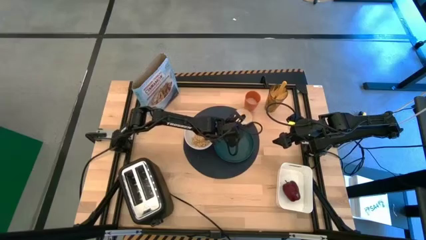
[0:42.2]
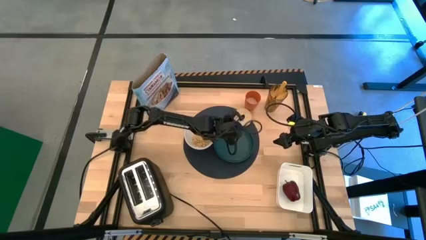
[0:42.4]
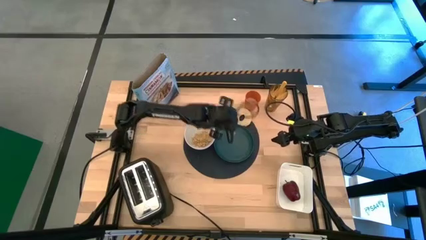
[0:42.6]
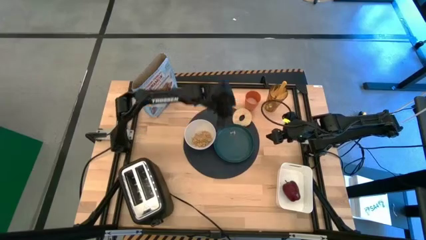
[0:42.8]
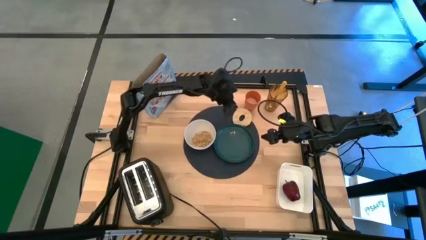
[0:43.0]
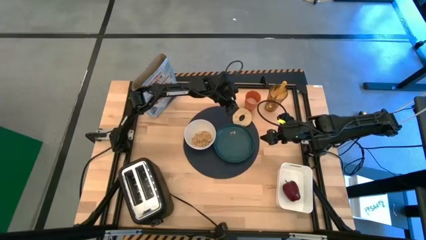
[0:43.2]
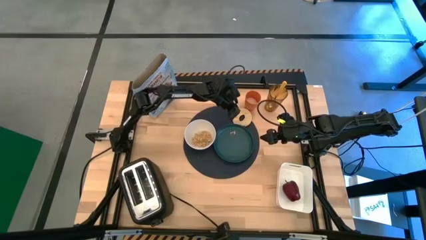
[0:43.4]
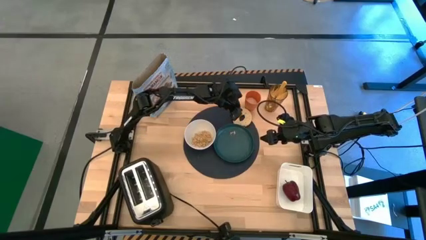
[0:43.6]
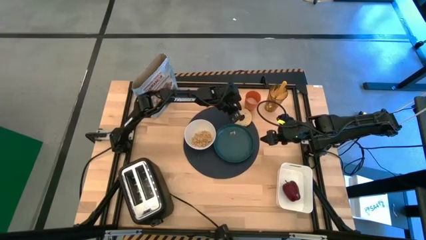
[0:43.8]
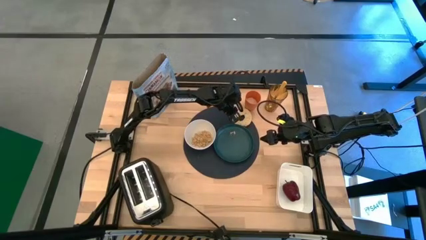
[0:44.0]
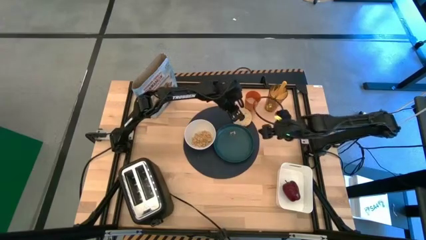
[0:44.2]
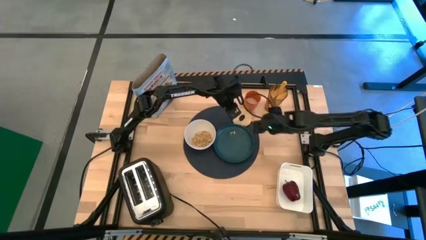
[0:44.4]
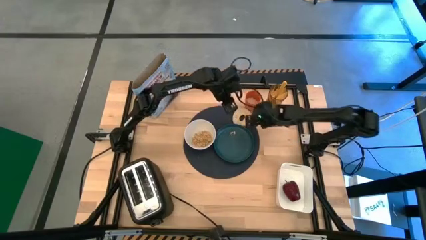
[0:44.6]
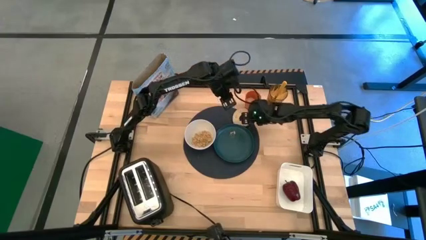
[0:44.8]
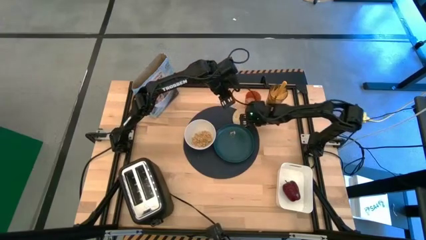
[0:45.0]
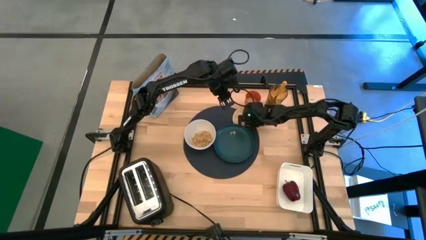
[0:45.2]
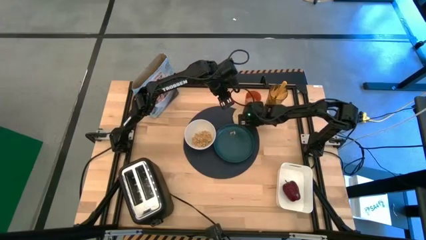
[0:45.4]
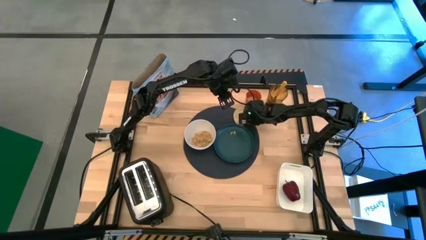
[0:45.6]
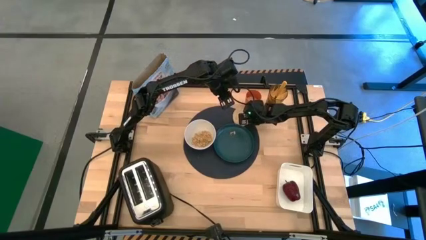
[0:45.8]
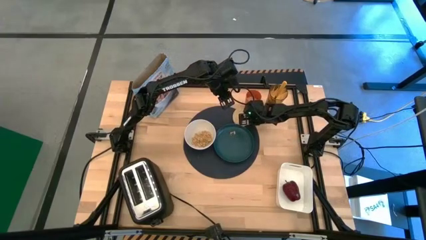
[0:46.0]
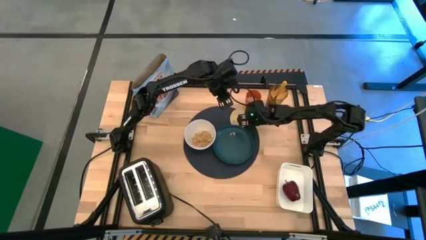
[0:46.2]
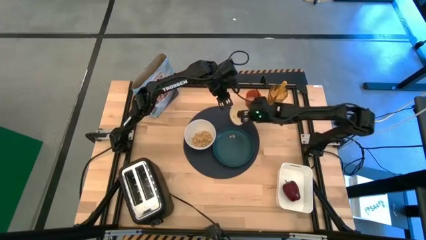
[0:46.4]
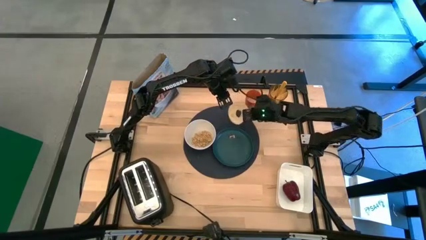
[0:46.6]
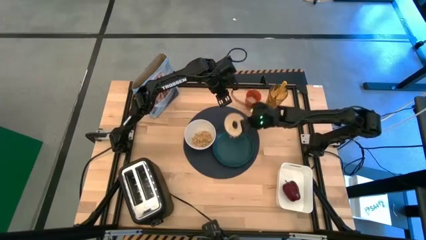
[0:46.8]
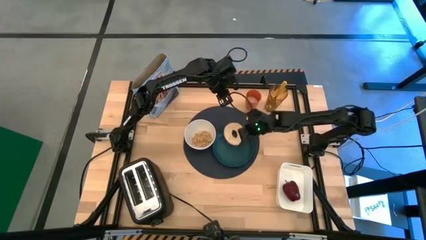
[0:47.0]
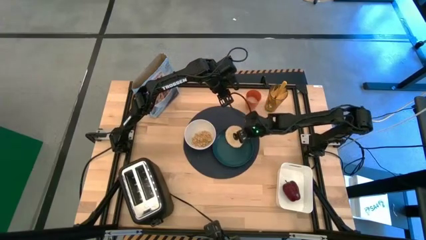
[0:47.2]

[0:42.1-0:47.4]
Task: Arrange a breakfast setting
Put the toasted bagel on top of the green plate on the blue table mat

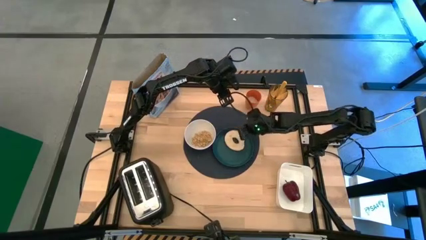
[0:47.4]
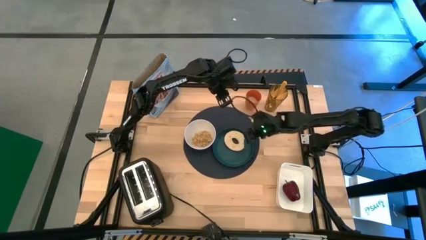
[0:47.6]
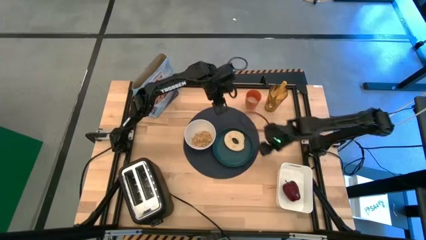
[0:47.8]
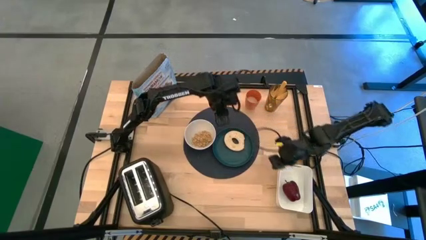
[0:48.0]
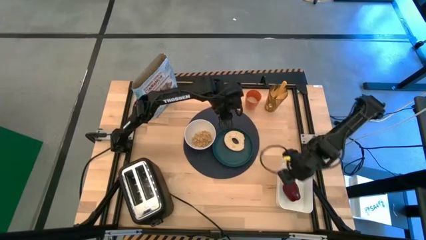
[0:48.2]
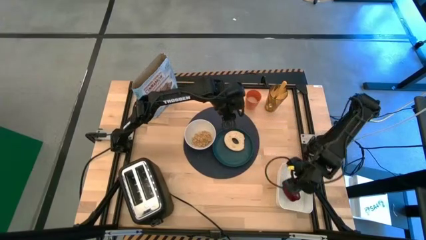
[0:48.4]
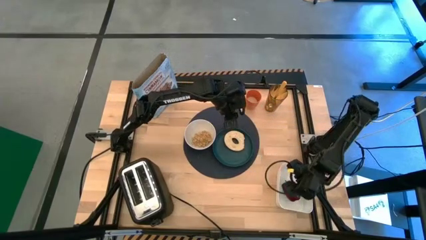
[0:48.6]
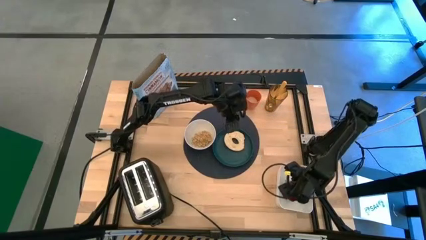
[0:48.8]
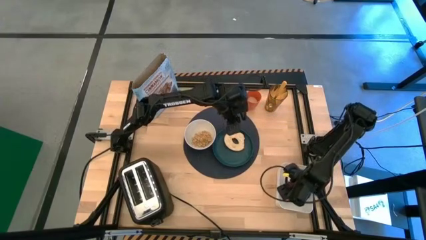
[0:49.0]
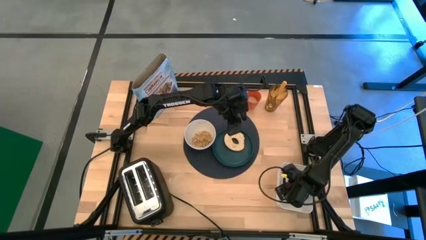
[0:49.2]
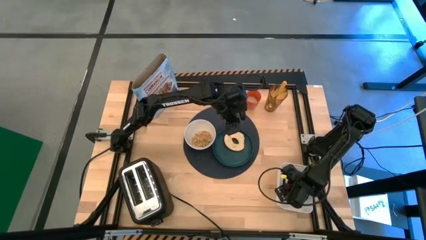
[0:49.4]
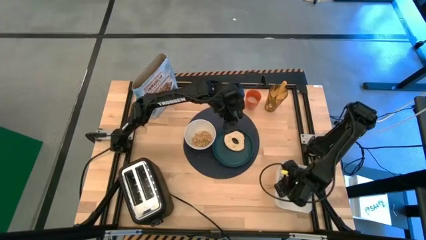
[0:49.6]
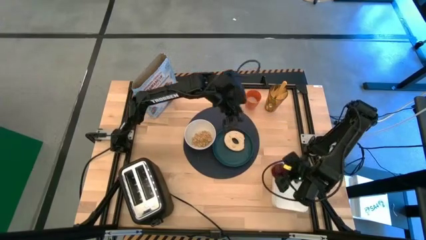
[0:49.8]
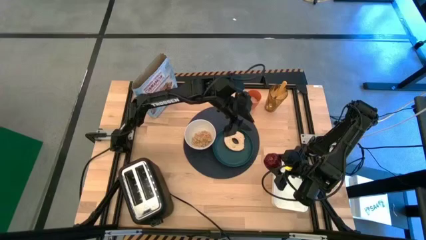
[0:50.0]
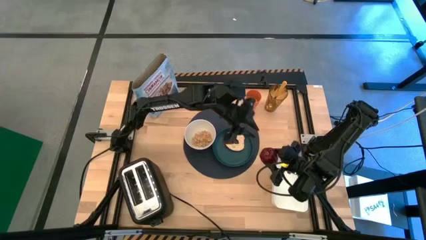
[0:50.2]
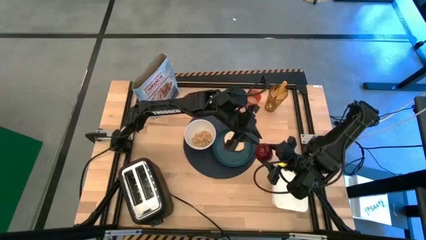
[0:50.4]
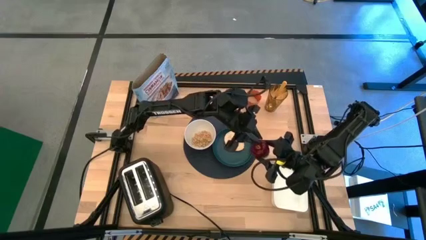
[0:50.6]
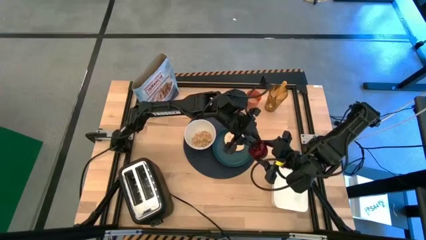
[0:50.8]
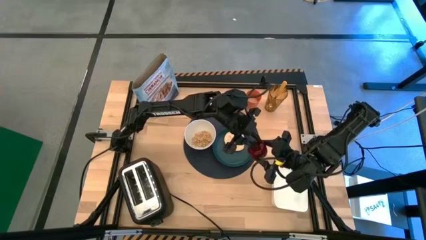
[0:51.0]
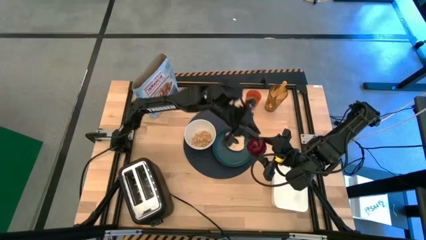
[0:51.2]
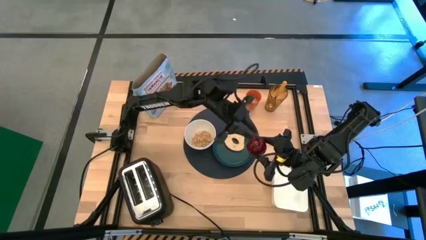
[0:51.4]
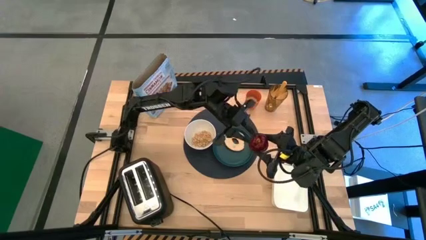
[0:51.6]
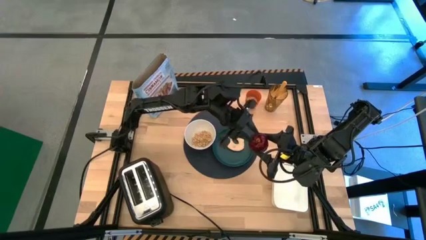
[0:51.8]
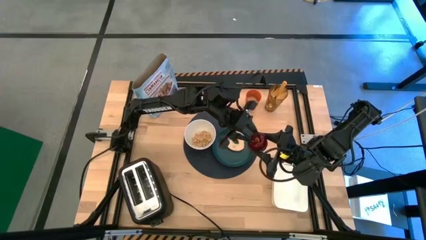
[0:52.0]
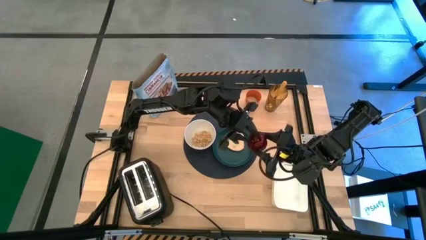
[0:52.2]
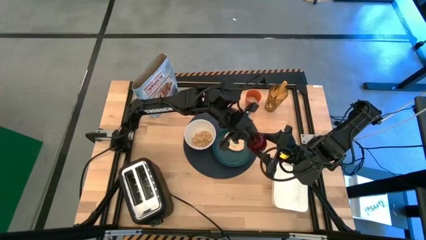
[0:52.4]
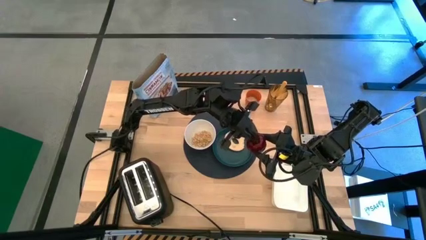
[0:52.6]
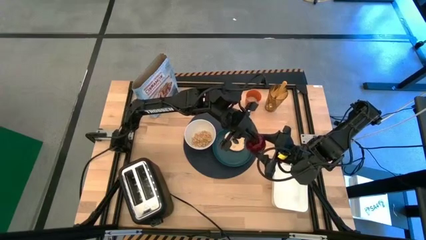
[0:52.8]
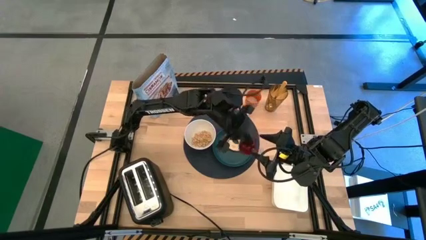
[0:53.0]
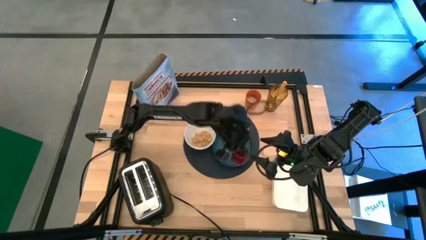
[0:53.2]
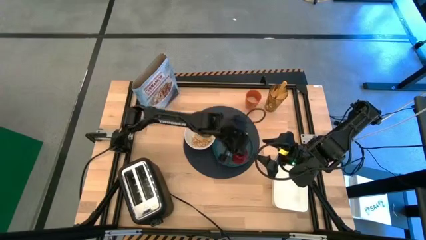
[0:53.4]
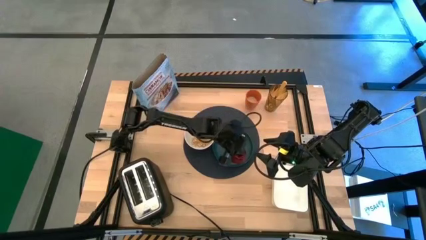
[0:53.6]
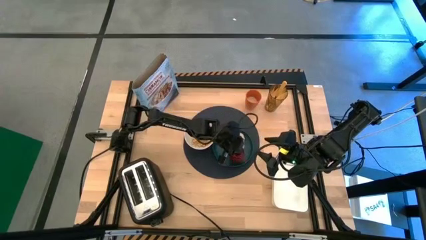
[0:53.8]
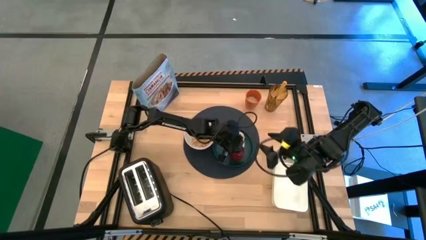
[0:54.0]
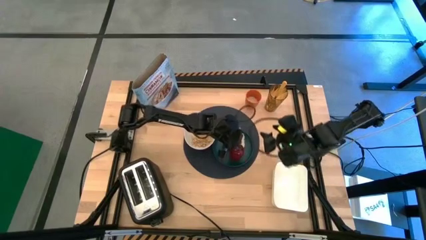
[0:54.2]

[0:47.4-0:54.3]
Put the apple to the bottom of the toasted bagel on top of the green plate on the blue table mat

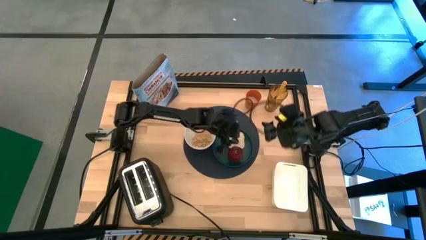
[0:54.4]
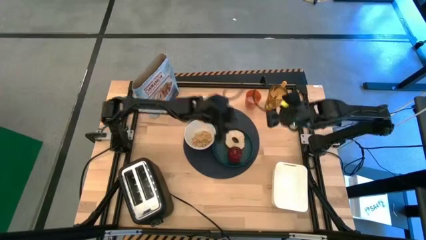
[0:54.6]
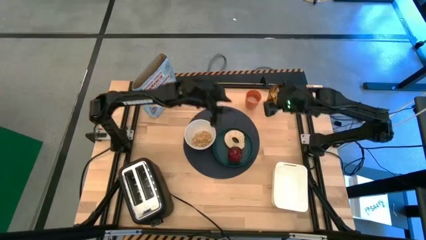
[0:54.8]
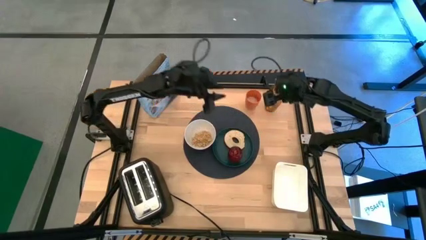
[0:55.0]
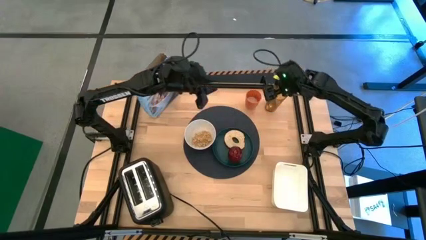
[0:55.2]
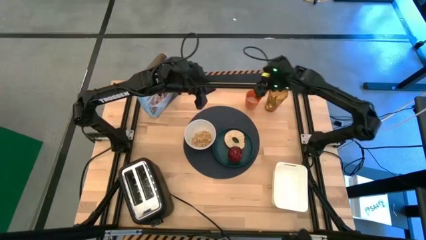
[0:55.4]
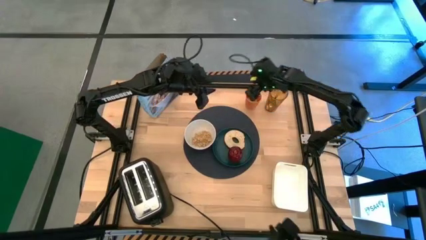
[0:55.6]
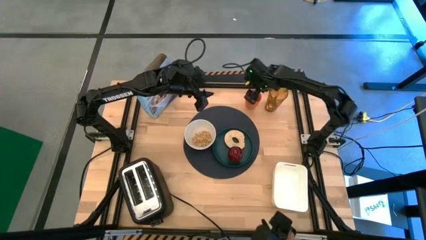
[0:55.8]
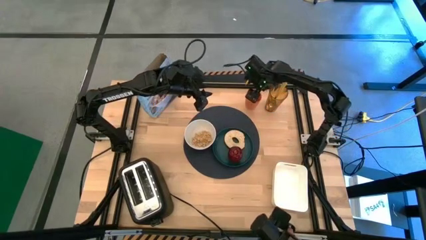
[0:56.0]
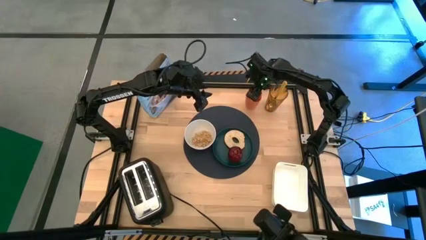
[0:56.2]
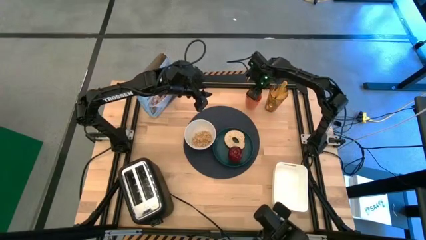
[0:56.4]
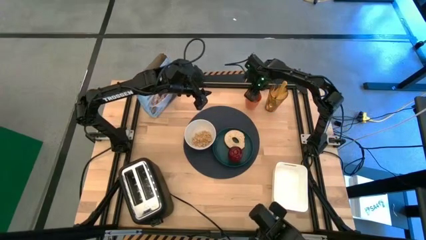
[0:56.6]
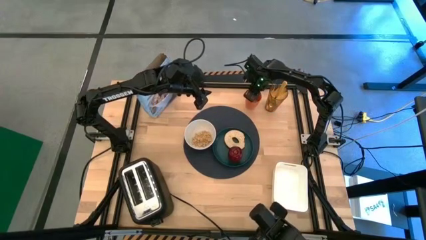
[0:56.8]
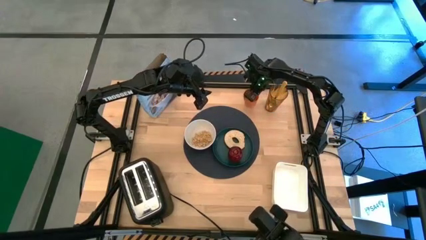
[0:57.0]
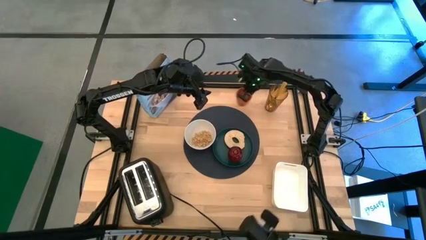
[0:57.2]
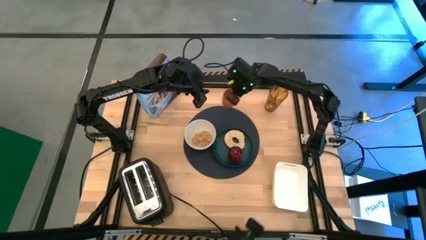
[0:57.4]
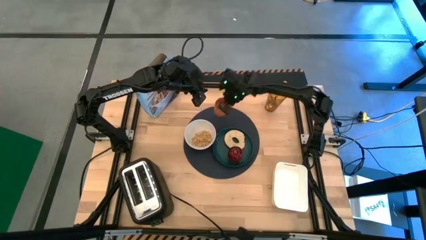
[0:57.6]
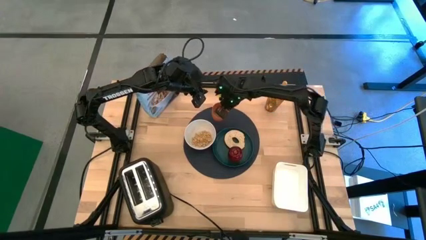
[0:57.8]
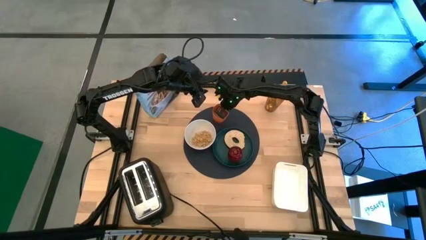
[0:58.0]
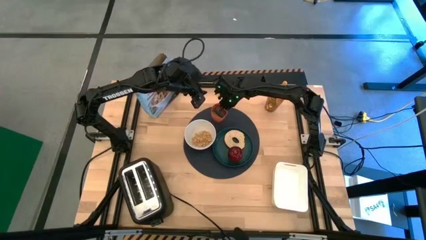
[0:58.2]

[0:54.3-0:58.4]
Put the orange cup to the top right of the white bowl on the blue table mat
